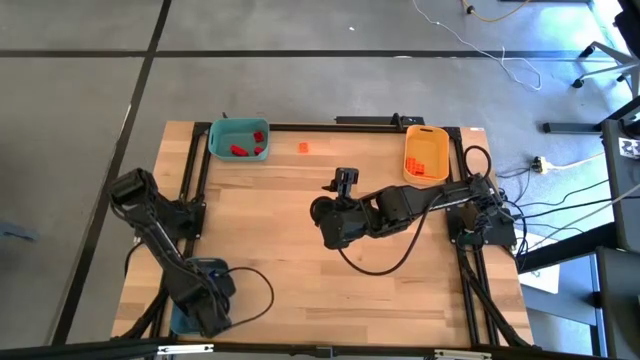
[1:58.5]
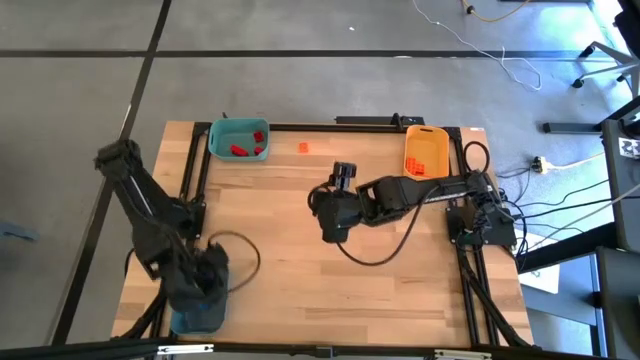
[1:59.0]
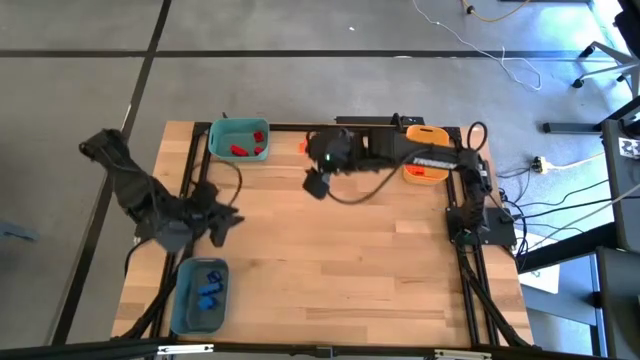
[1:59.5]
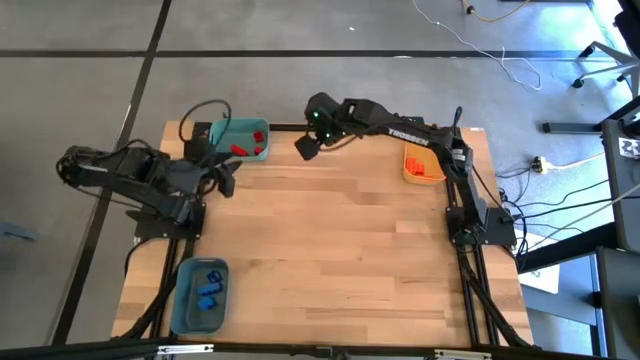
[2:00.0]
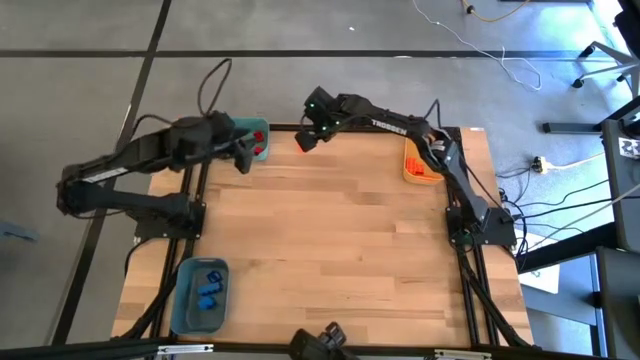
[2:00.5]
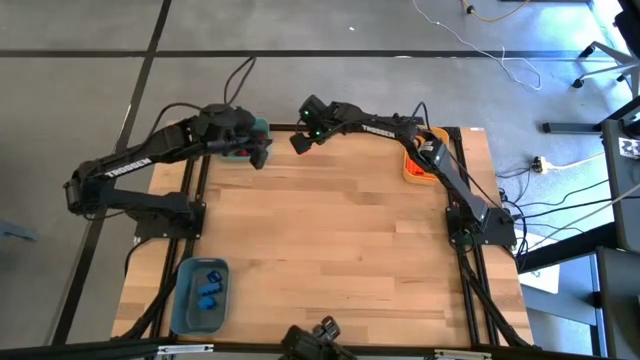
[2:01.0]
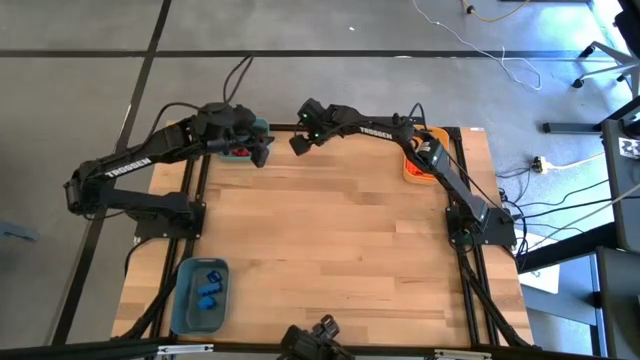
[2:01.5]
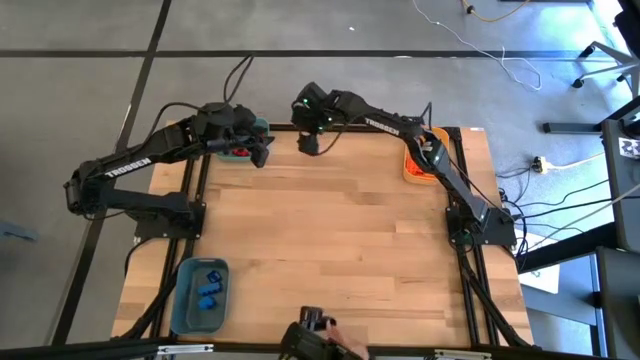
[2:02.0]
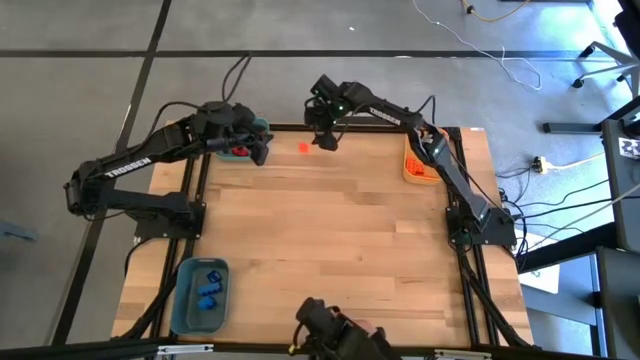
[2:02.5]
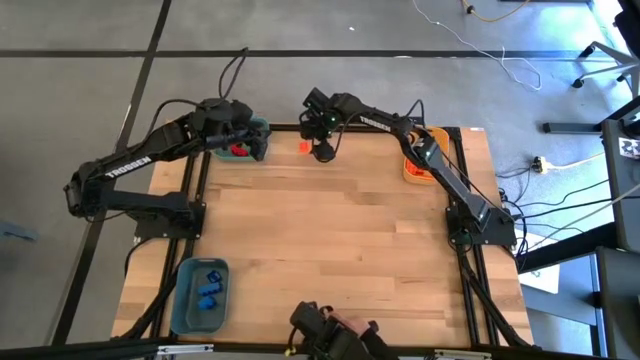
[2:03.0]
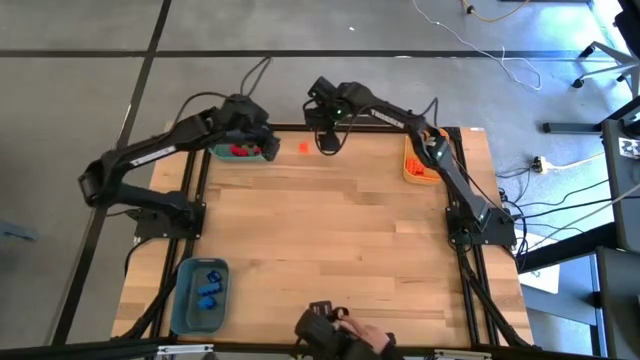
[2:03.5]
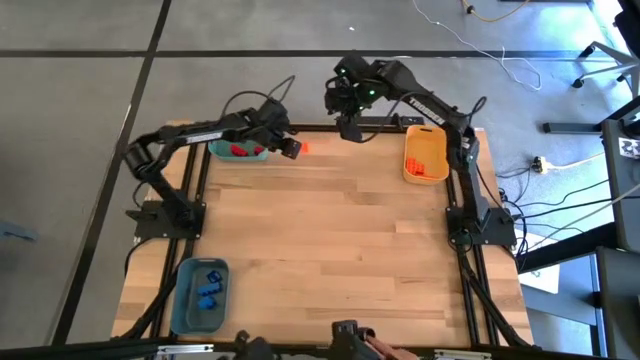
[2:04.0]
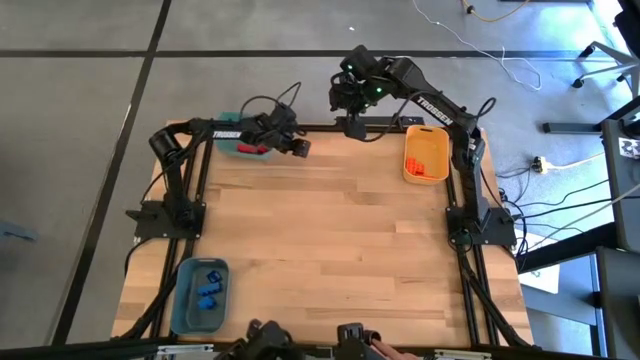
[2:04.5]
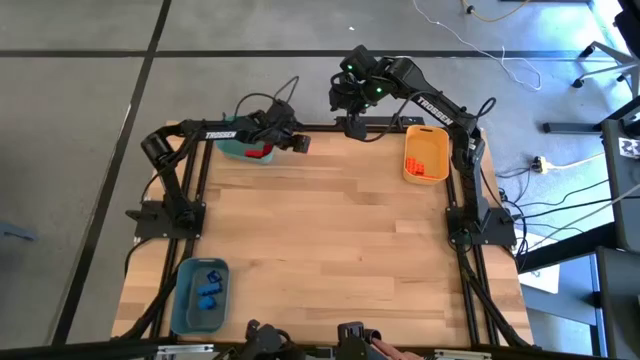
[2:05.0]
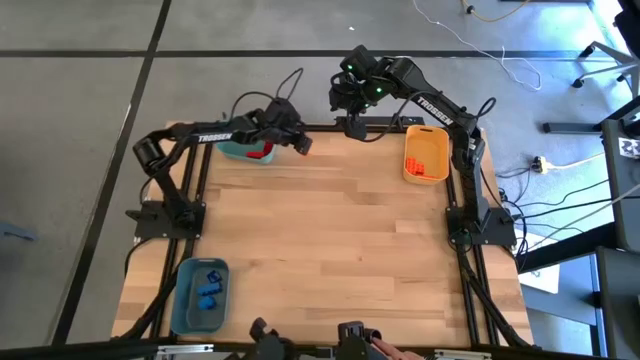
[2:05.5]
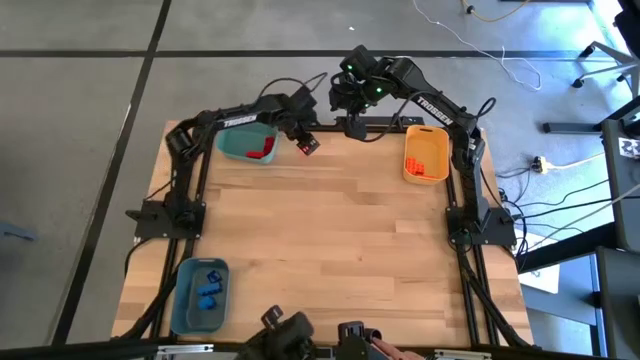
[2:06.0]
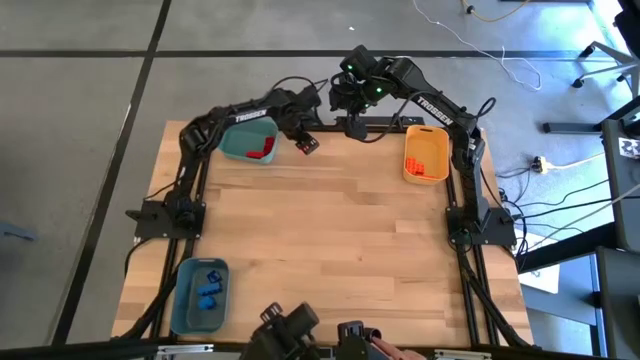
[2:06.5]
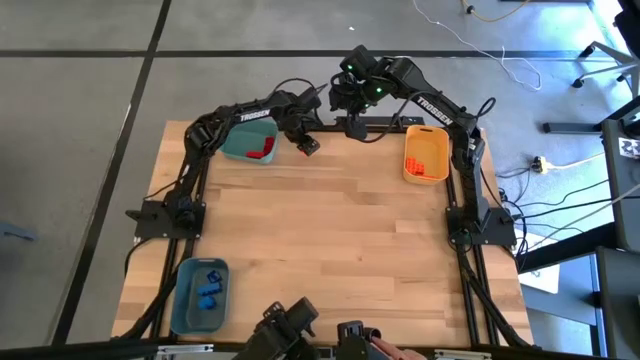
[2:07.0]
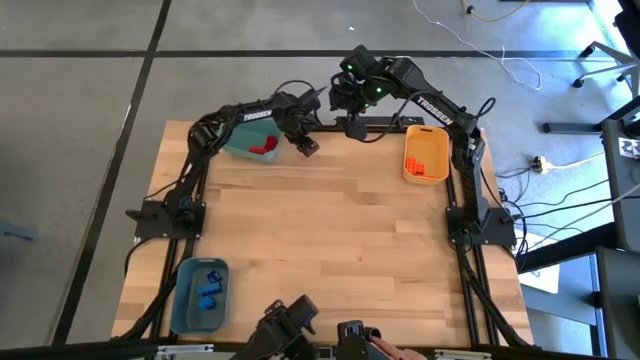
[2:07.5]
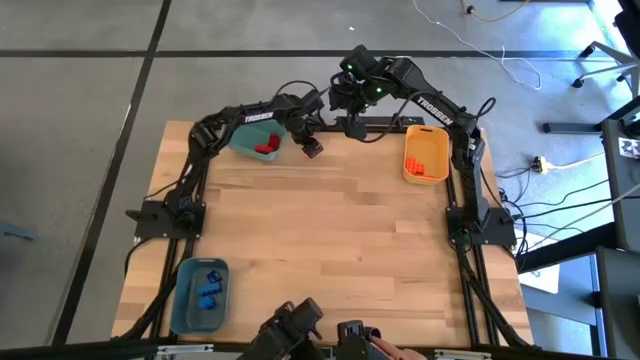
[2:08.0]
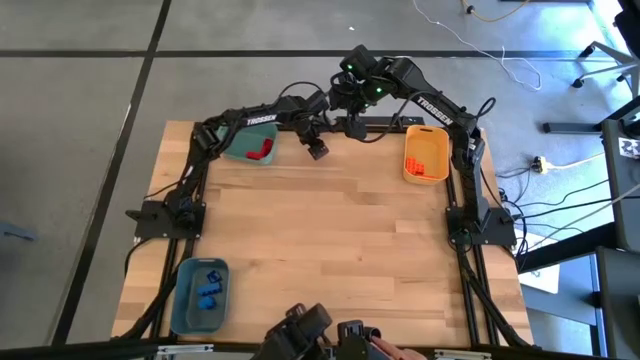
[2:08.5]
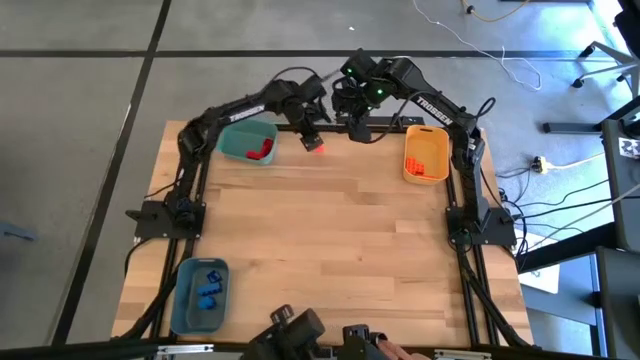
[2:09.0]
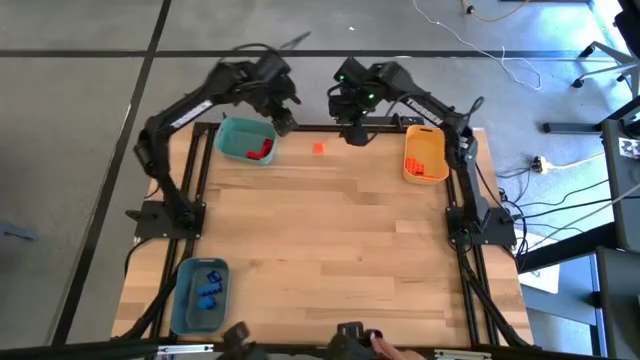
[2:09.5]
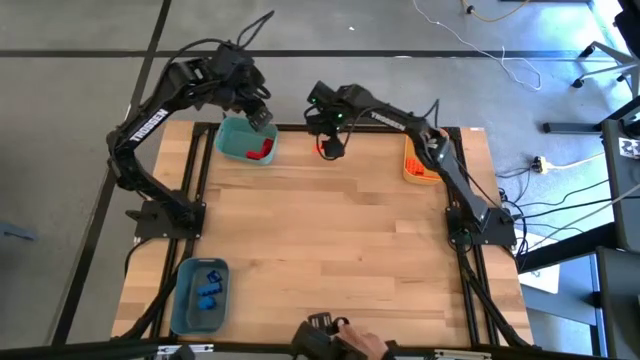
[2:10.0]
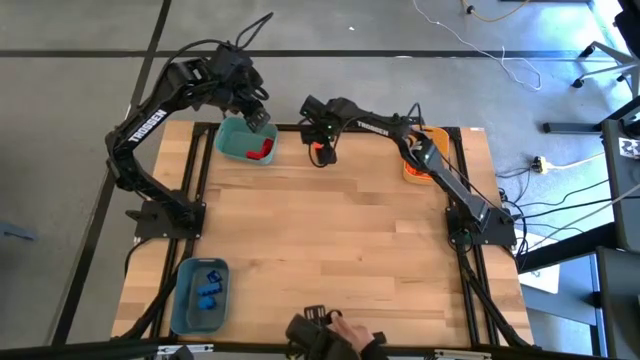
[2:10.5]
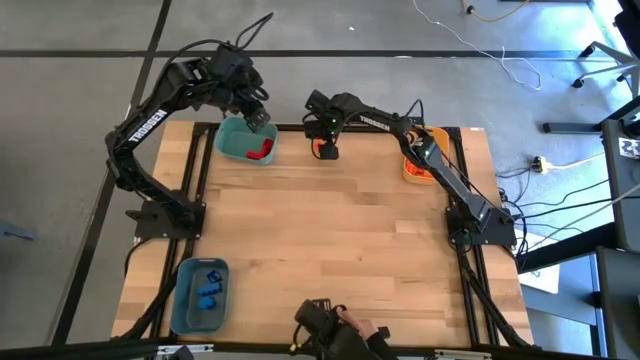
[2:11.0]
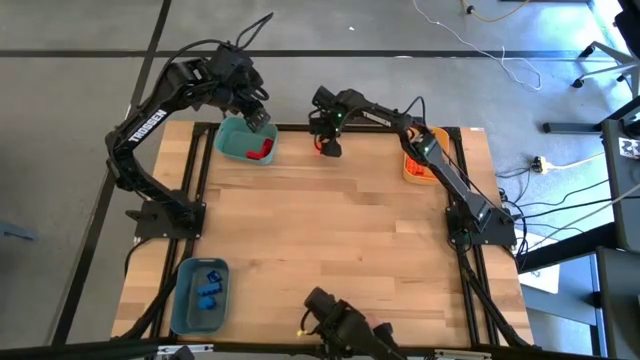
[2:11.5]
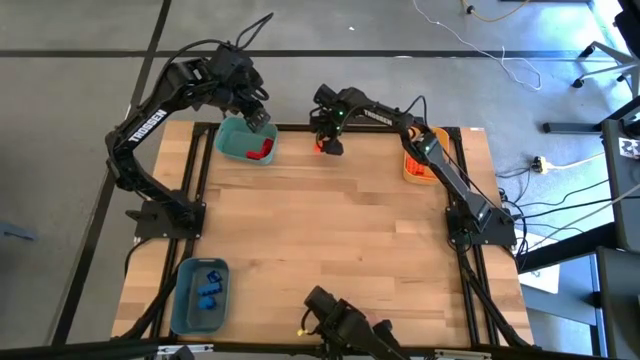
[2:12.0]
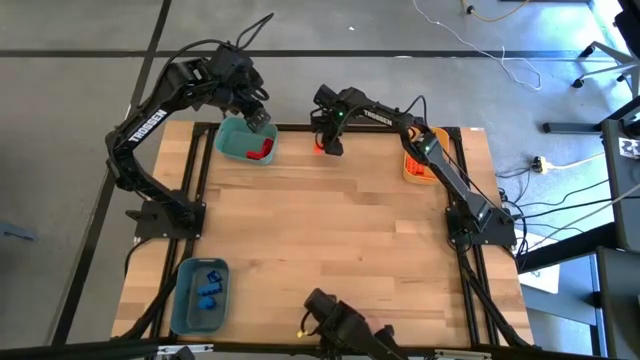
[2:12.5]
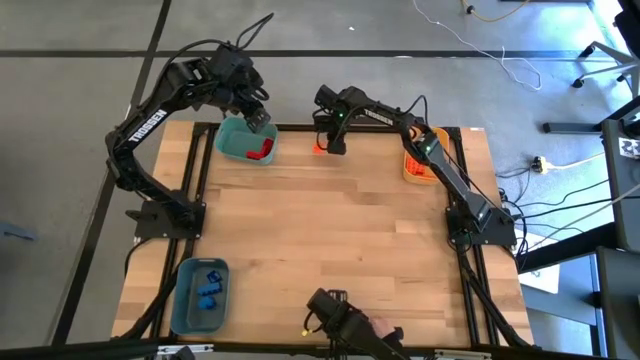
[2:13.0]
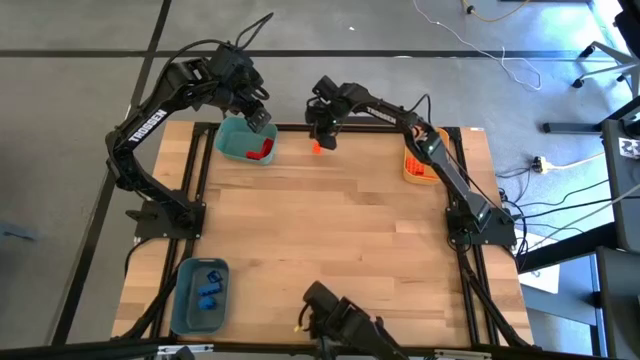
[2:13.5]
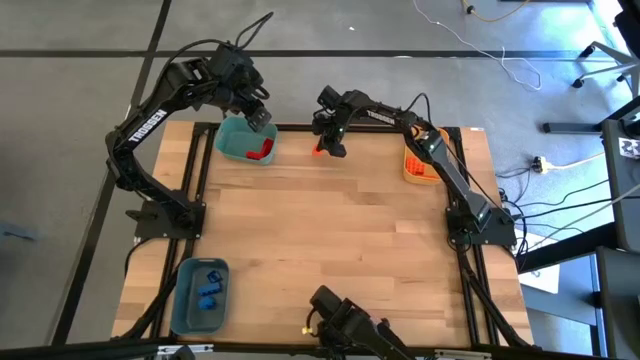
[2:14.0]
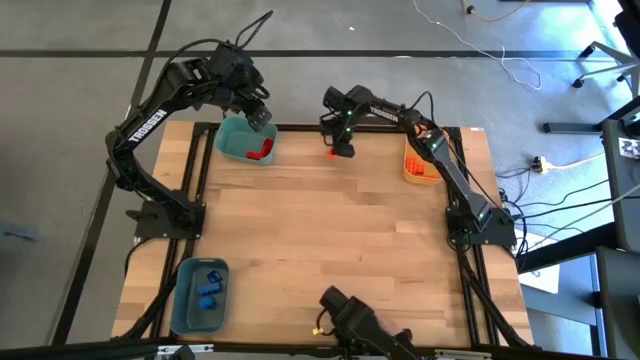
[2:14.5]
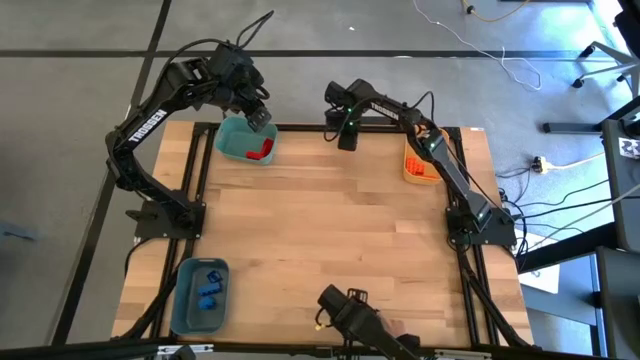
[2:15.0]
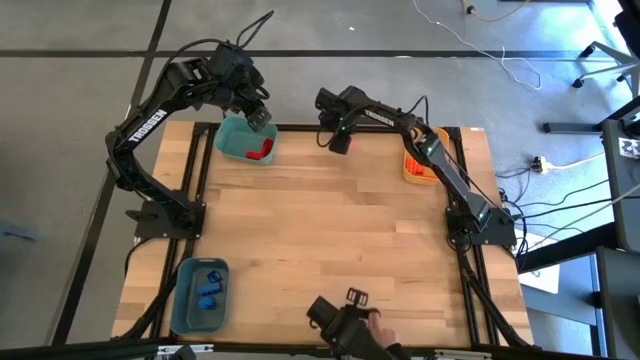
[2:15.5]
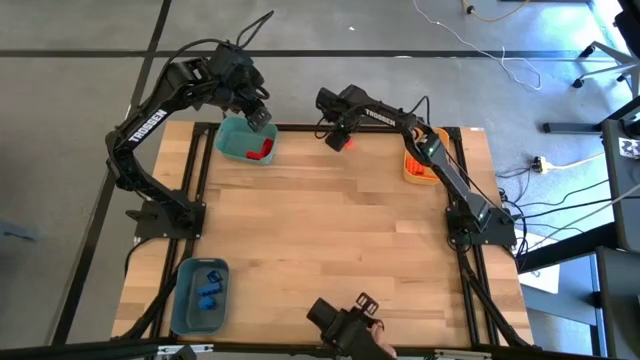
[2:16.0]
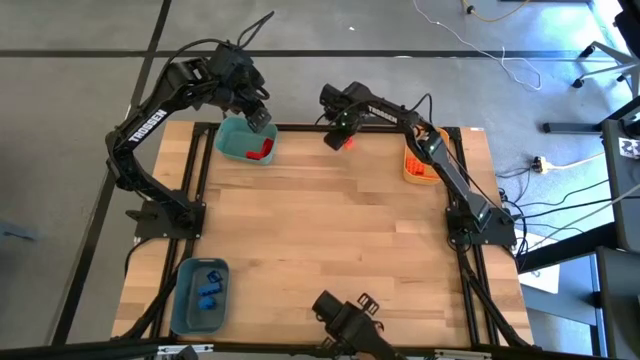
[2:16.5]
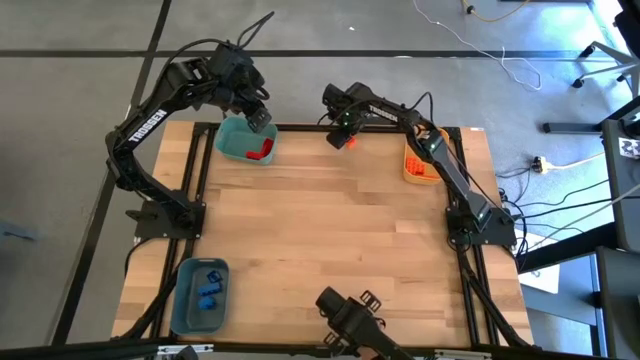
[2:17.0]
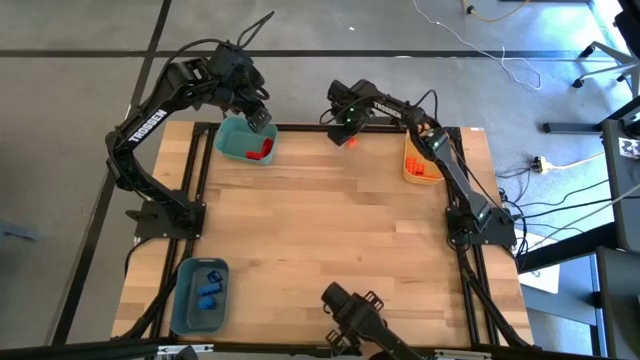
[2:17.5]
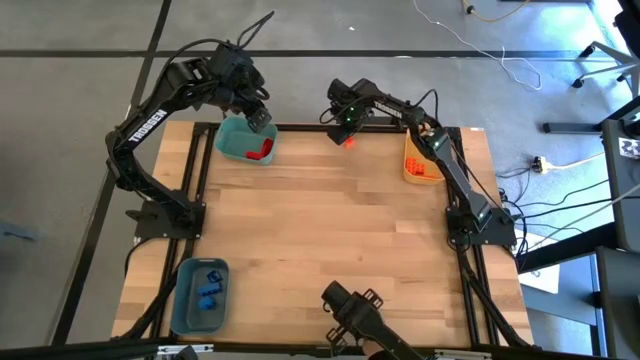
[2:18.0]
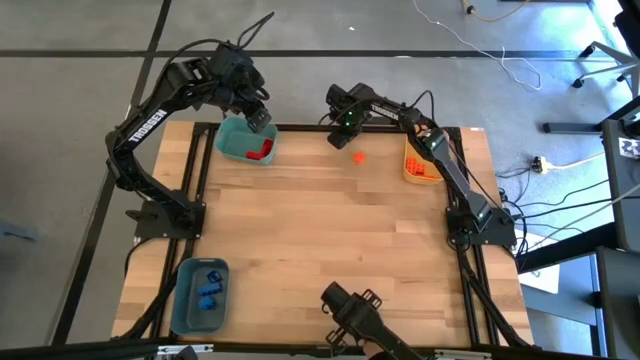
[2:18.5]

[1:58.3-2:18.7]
Task: Sort & place blocks by color
Put the orange game piece into the yellow bin

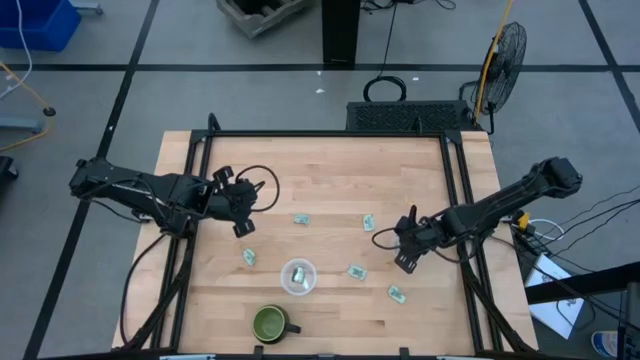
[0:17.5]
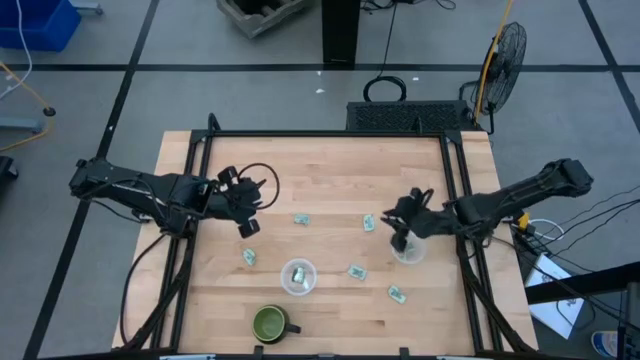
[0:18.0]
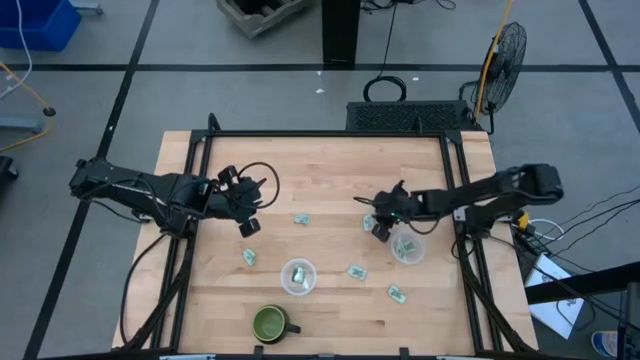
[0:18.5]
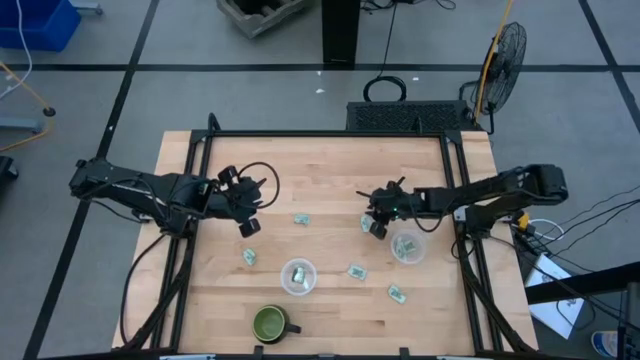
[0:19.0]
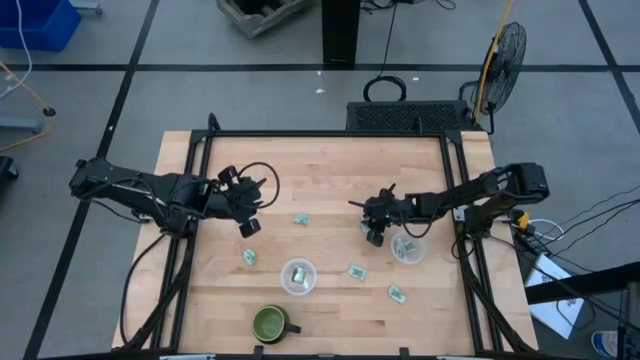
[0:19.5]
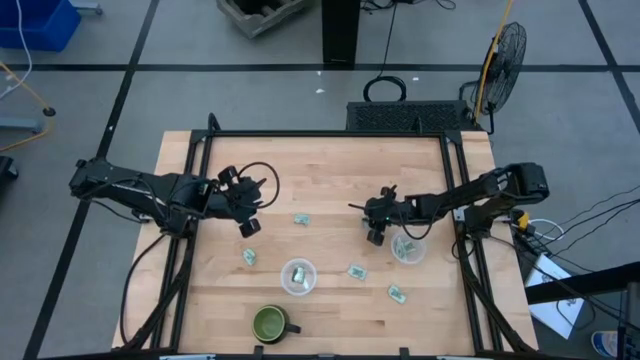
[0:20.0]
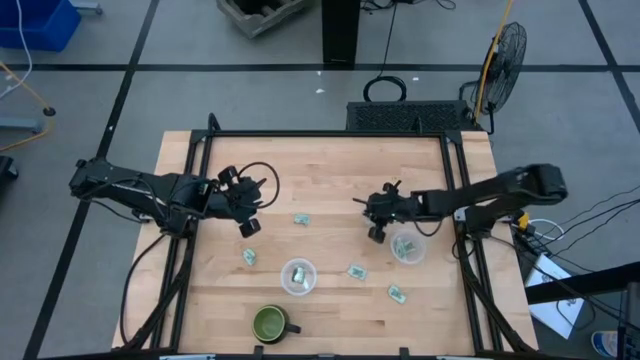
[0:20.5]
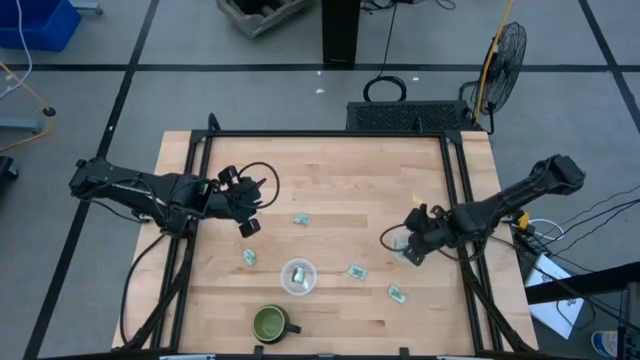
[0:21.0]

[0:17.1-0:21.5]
Task: Pick and place Stevia / Truvia into bins
Put the white stevia packet into the right transparent container
